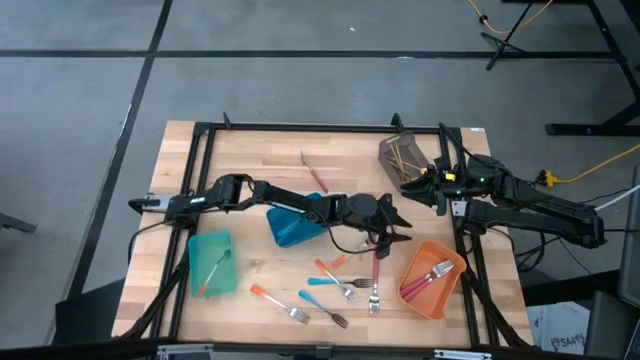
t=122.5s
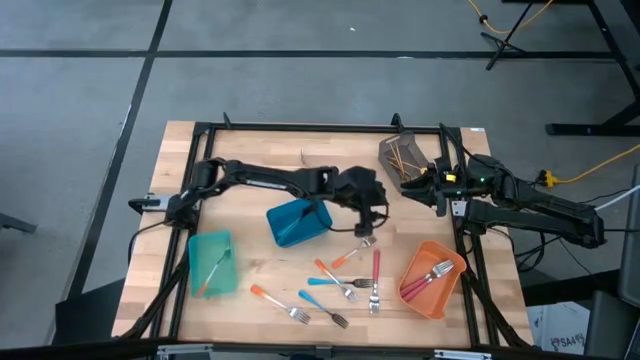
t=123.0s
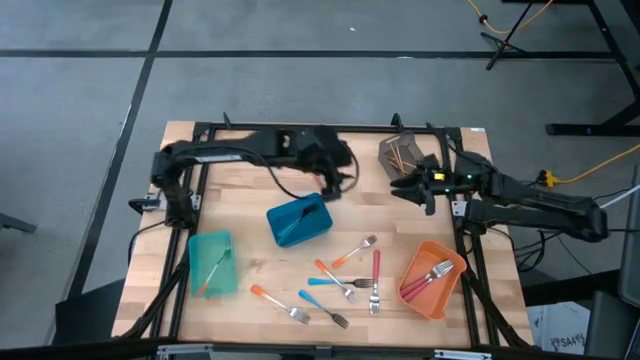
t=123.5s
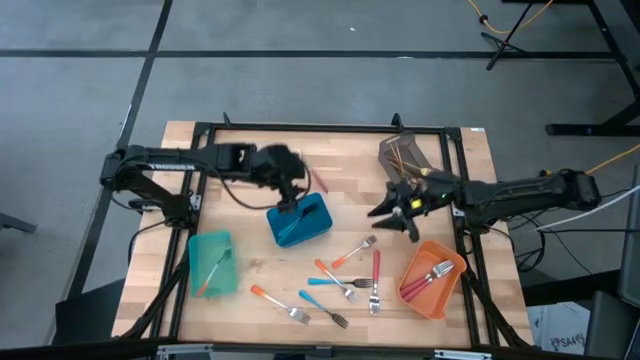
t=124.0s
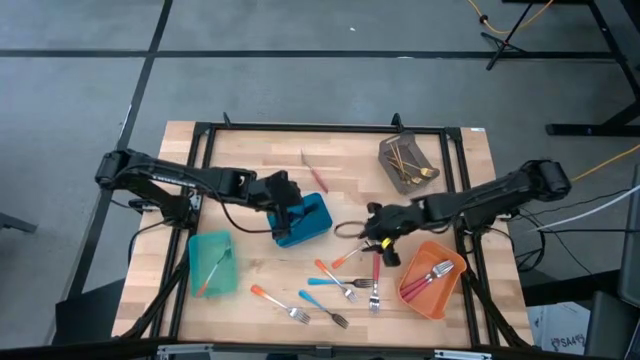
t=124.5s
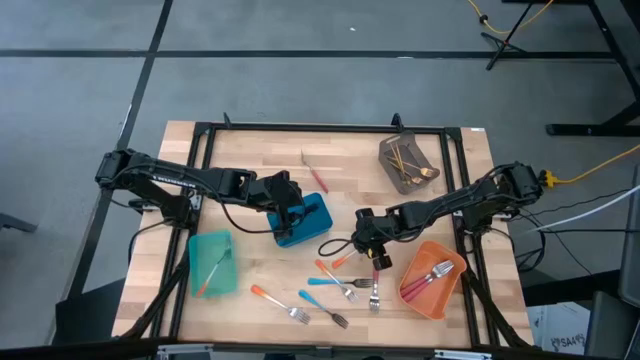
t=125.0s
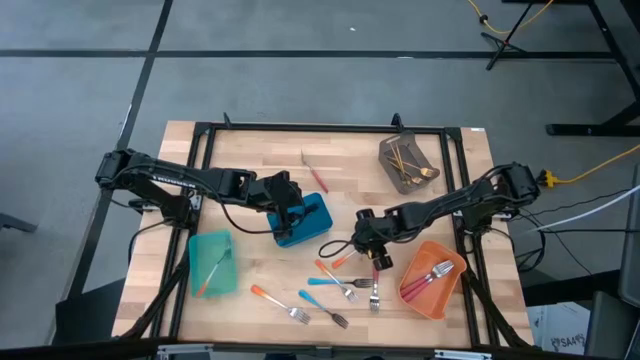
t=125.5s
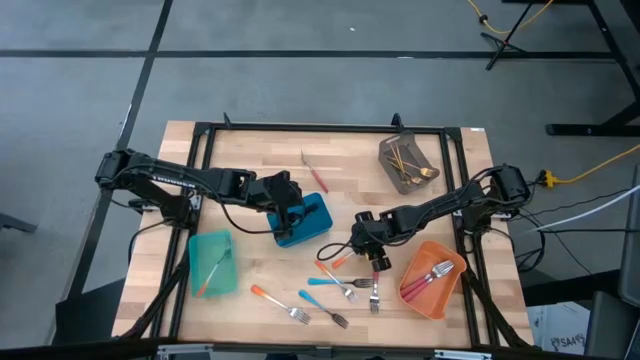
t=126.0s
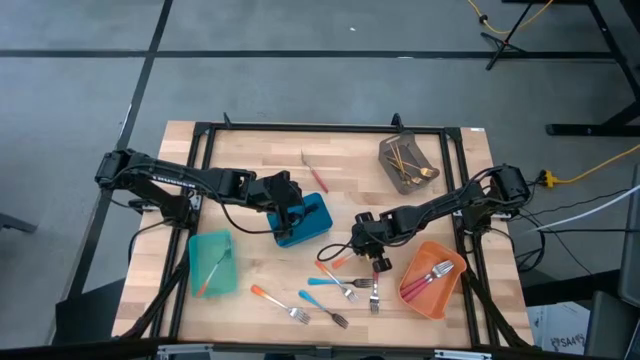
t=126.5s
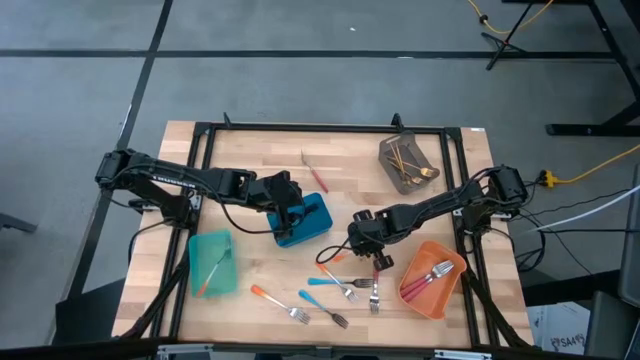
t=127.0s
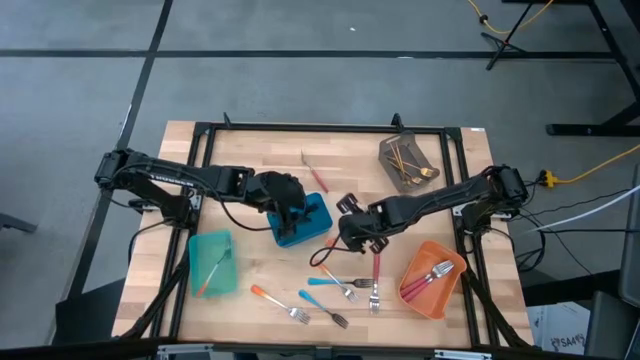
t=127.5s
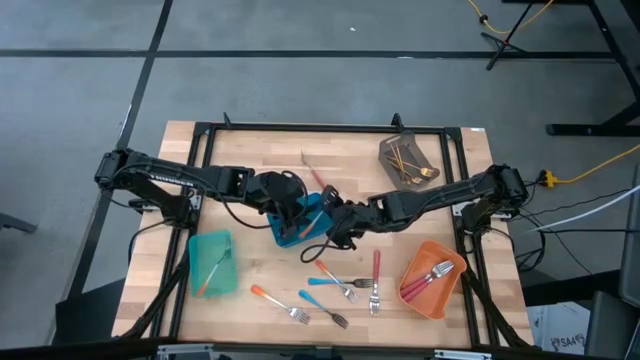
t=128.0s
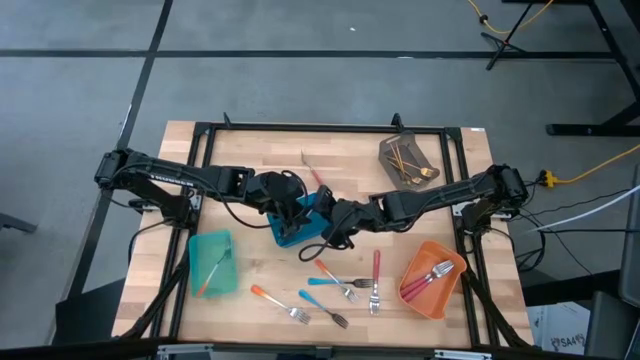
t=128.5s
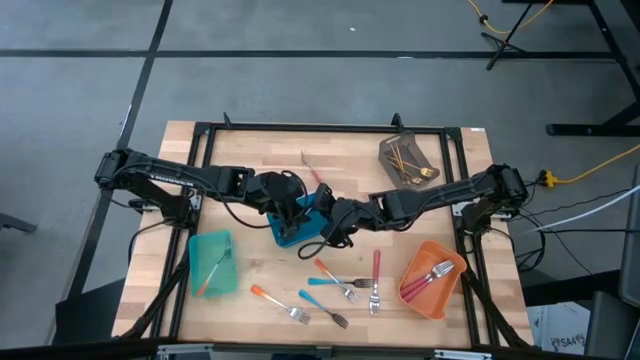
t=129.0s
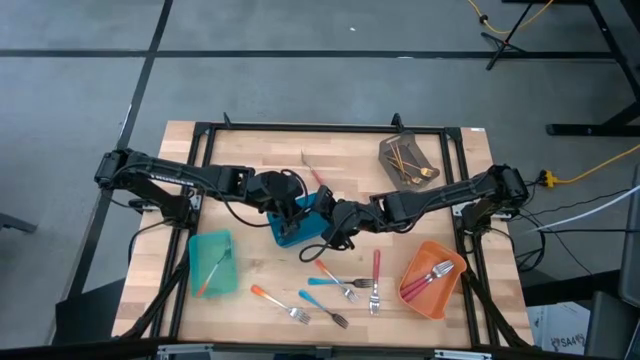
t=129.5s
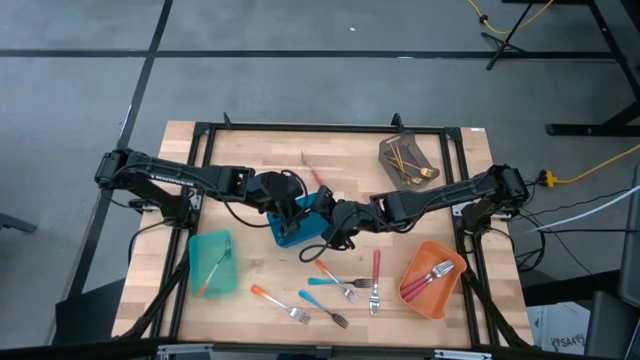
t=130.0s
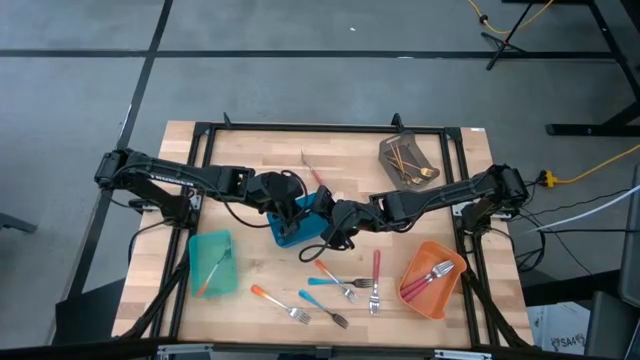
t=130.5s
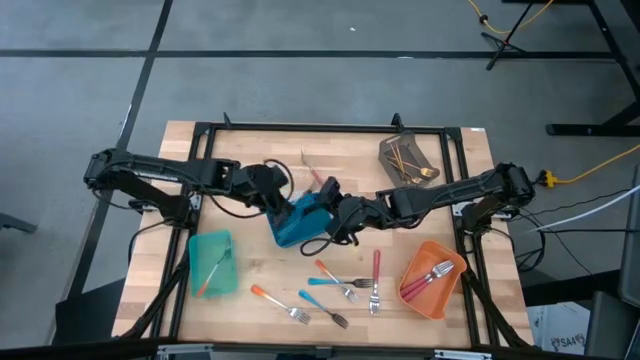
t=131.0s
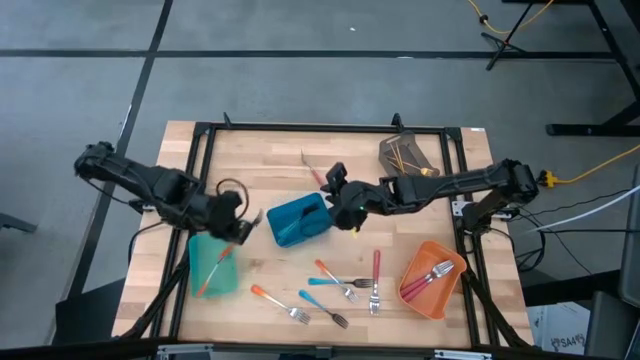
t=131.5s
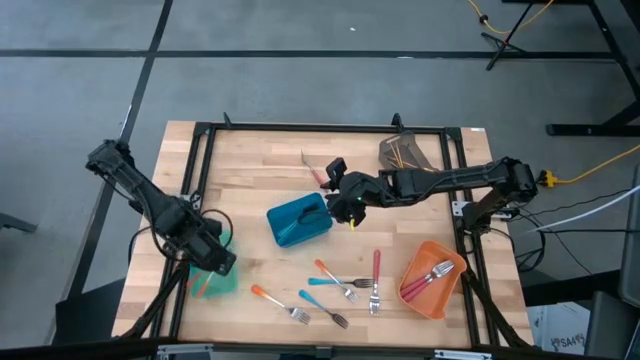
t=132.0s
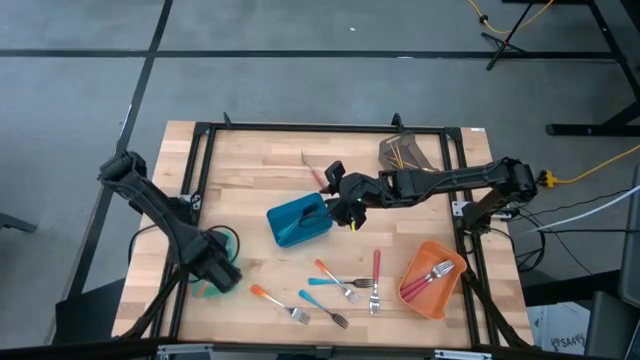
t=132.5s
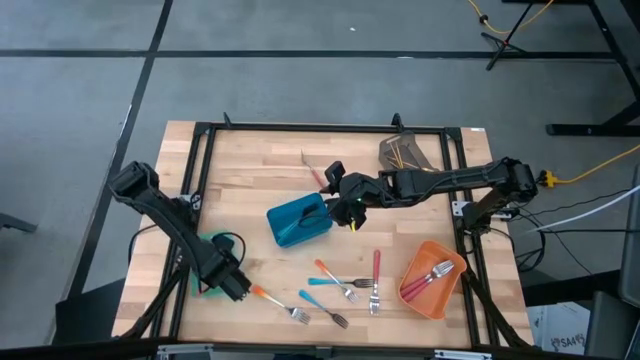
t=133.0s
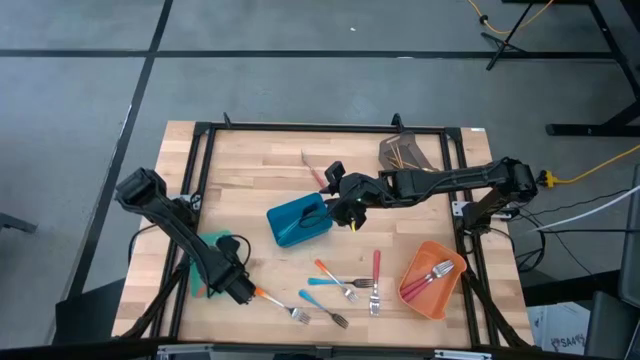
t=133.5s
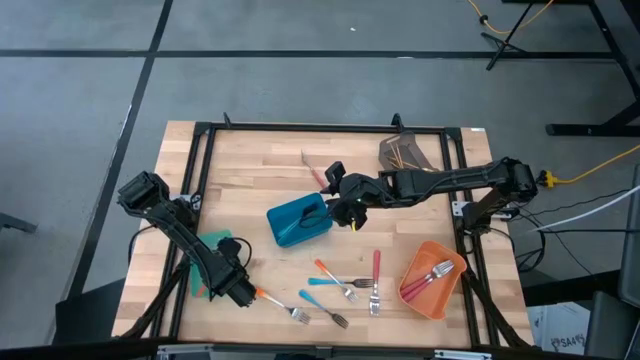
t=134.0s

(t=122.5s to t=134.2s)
Task: Sort silverware by color (type)
Put the top right orange fork into the light blue bin

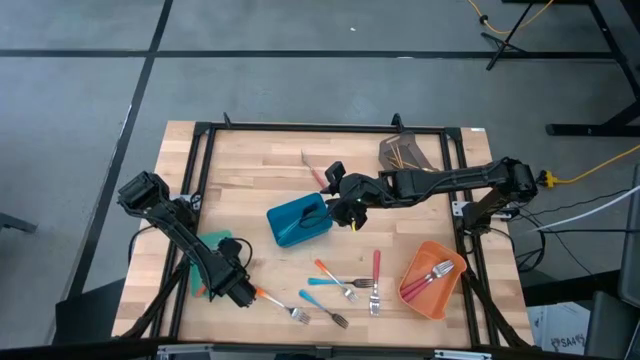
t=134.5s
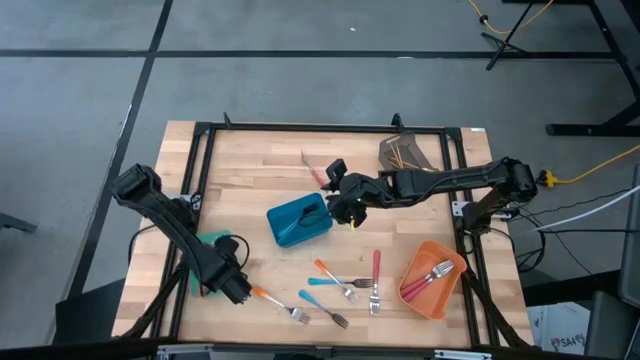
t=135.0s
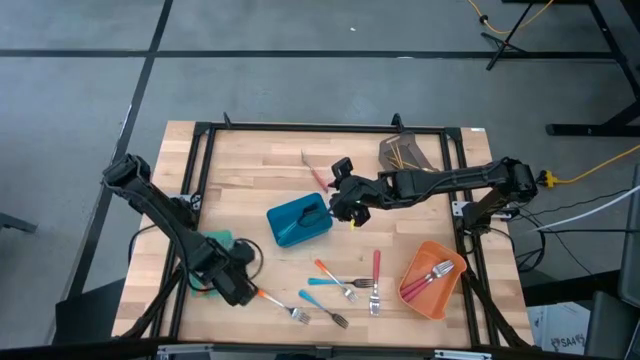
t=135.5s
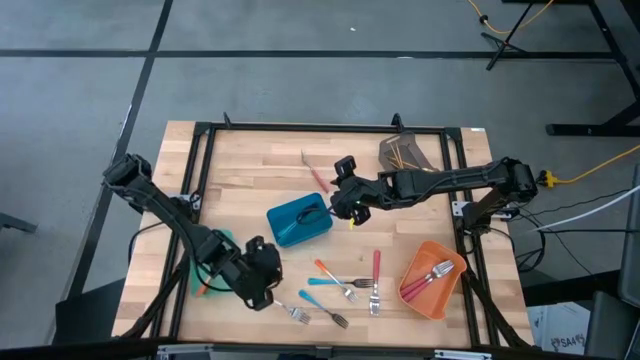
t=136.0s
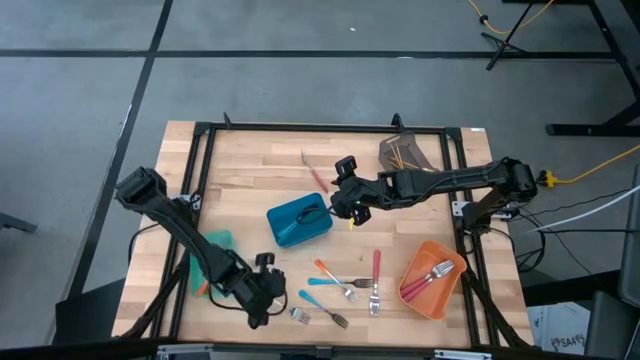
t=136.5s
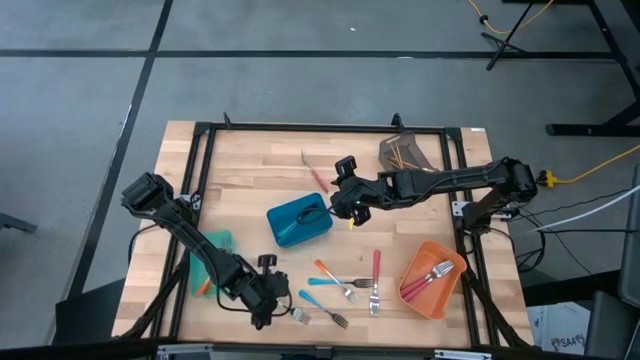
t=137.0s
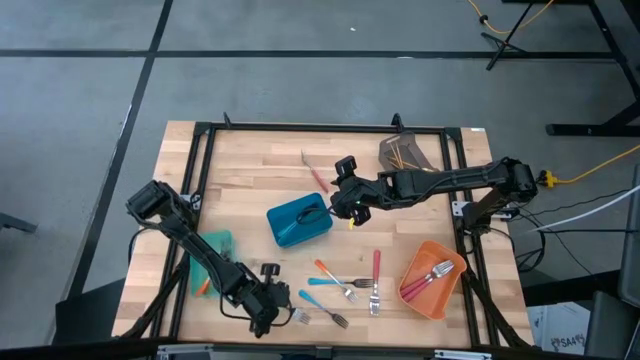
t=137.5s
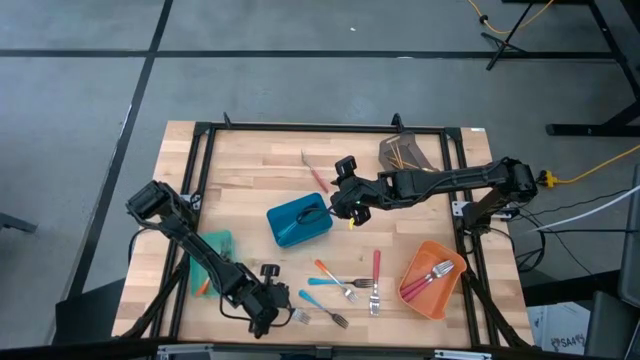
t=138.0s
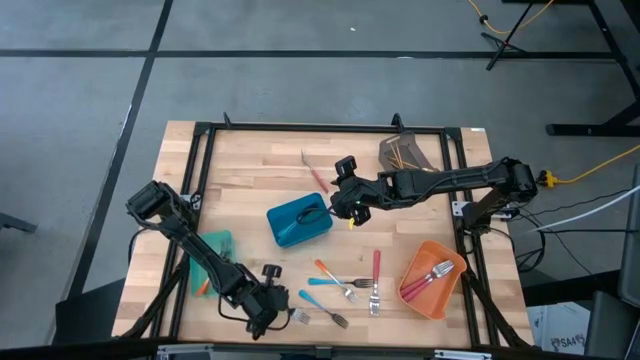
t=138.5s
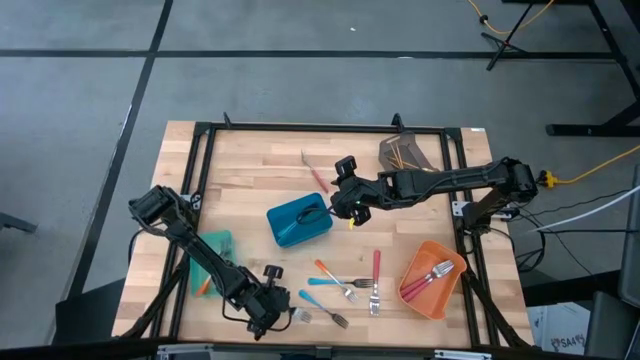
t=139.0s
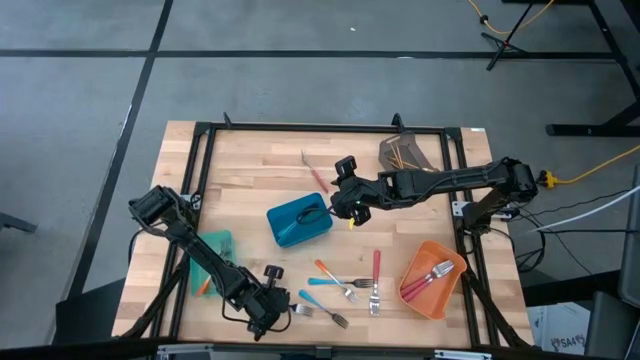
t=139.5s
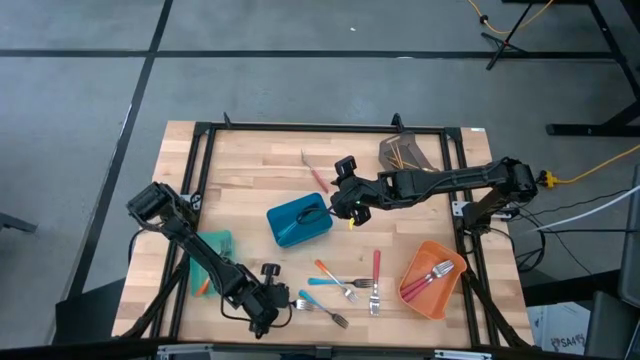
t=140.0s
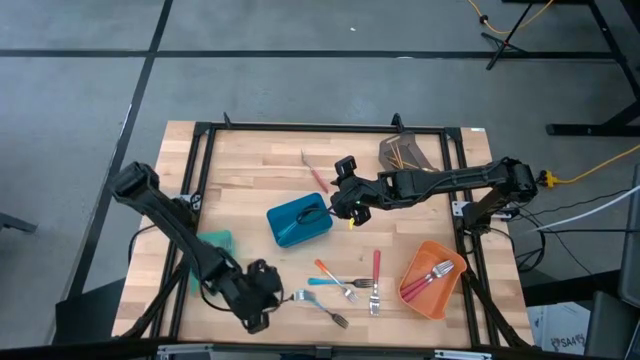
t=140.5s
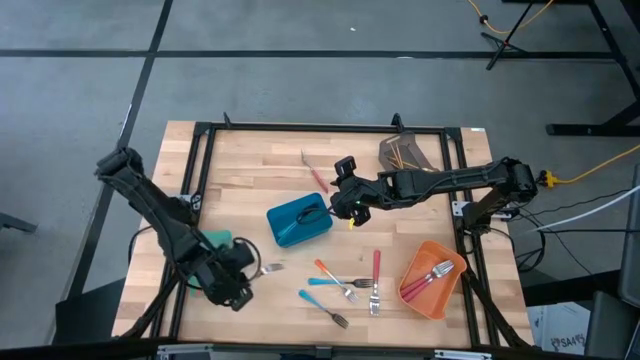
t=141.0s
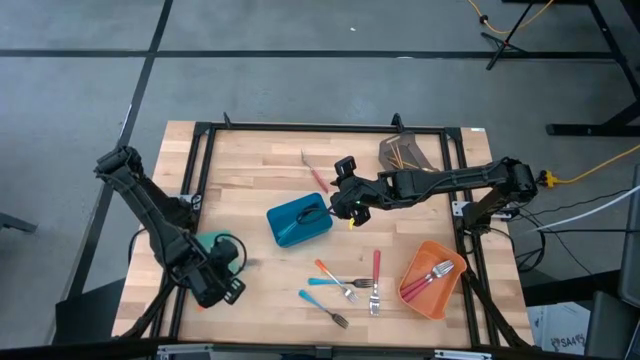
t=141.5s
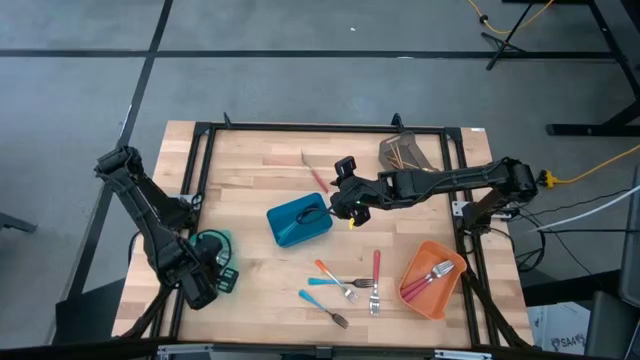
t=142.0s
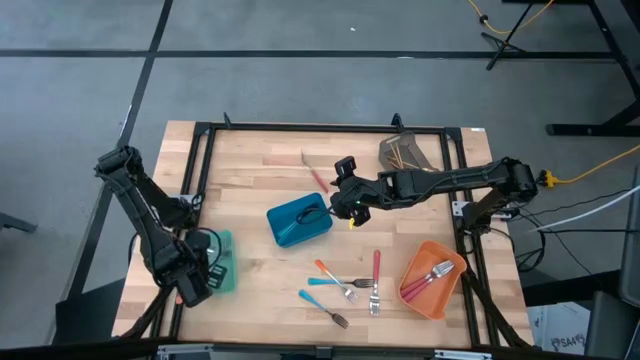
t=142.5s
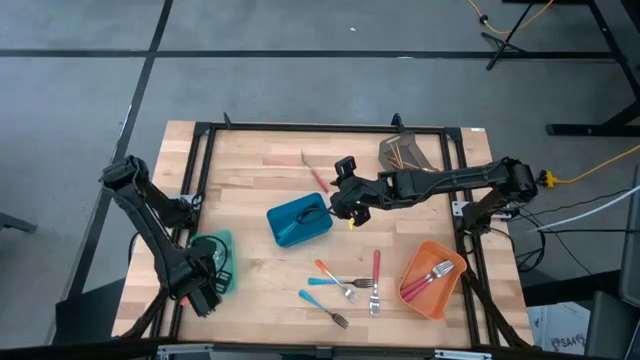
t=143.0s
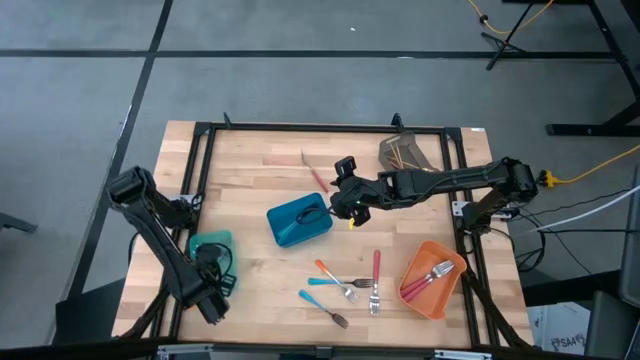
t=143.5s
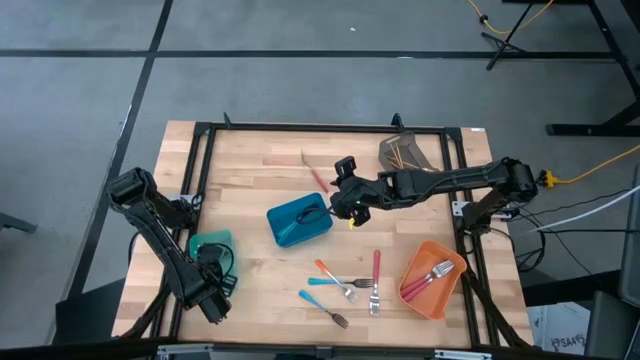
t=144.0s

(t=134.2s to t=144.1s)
Put the left orange fork into the light blue bin
